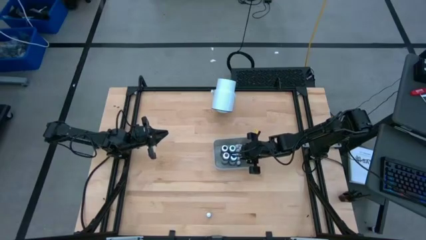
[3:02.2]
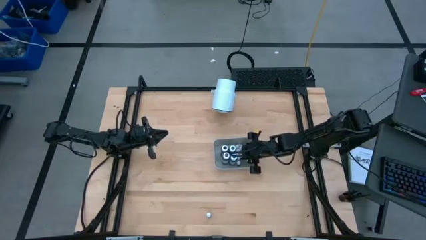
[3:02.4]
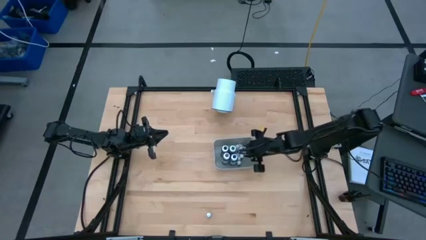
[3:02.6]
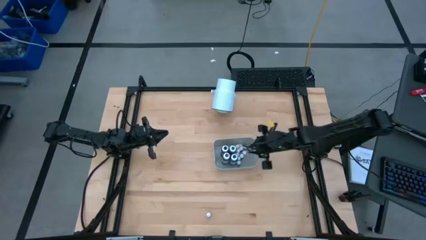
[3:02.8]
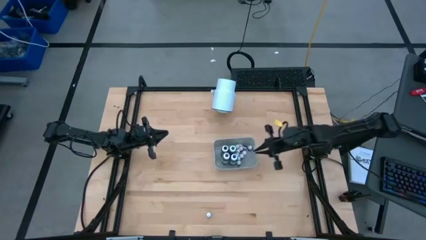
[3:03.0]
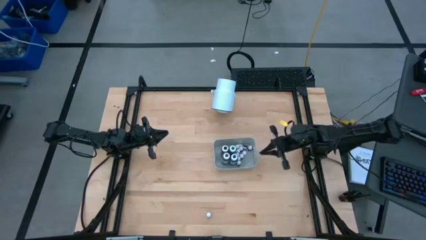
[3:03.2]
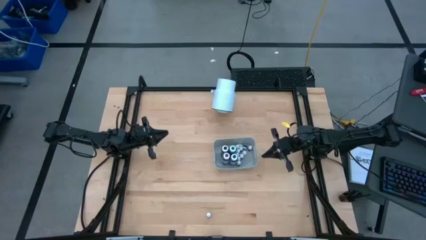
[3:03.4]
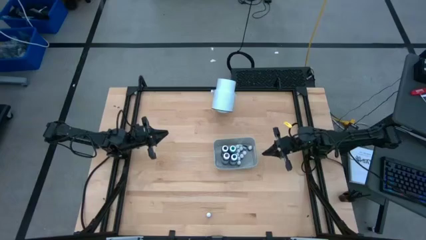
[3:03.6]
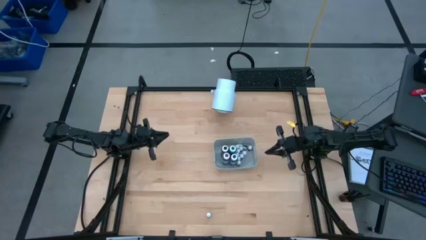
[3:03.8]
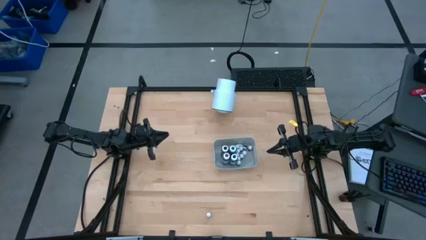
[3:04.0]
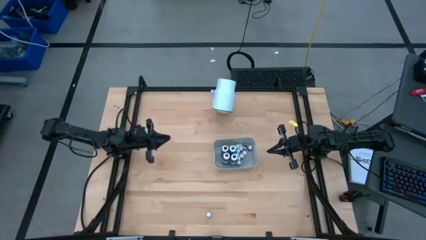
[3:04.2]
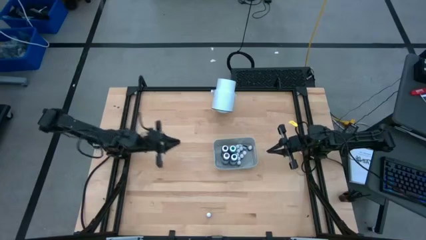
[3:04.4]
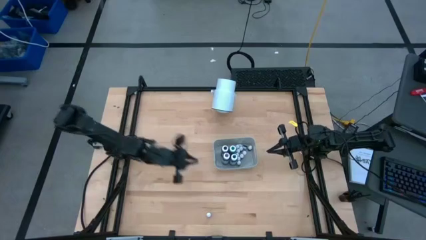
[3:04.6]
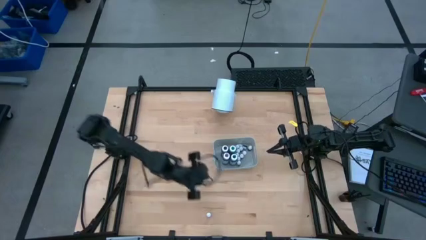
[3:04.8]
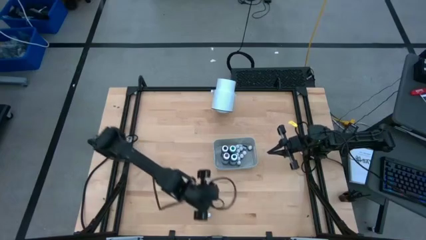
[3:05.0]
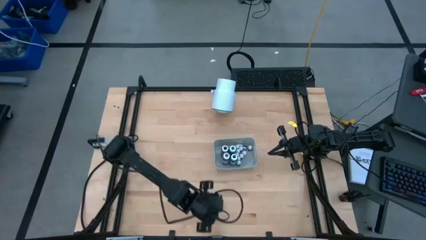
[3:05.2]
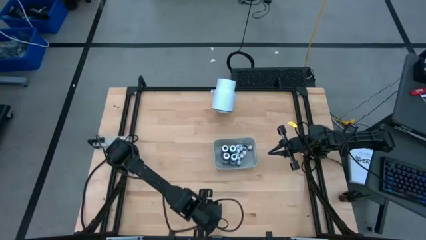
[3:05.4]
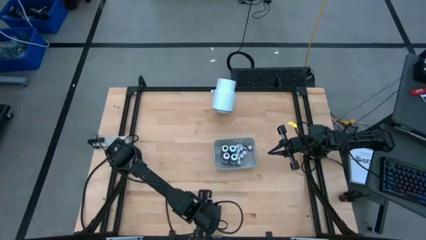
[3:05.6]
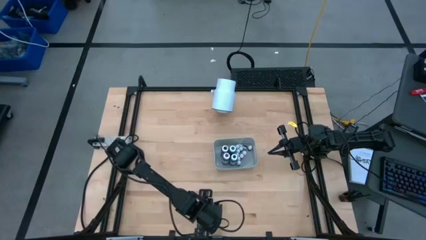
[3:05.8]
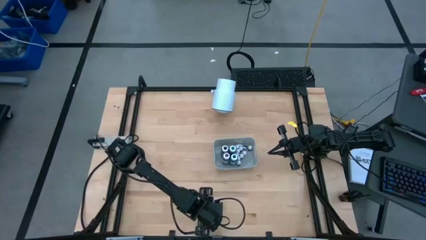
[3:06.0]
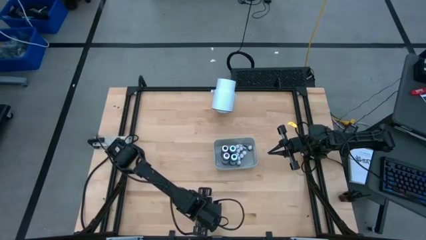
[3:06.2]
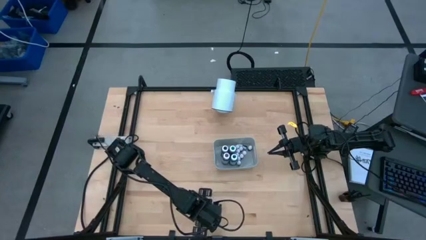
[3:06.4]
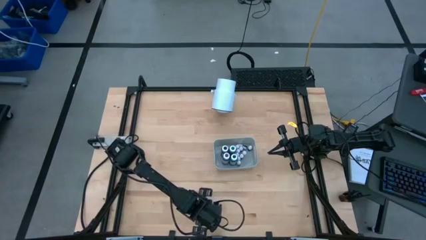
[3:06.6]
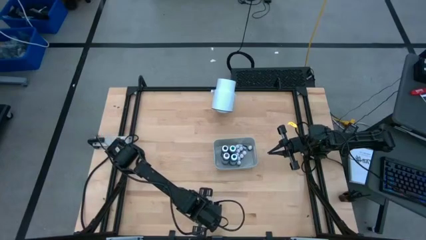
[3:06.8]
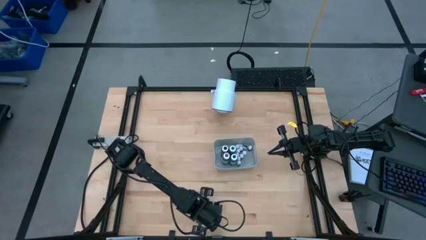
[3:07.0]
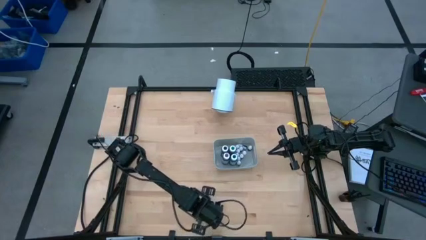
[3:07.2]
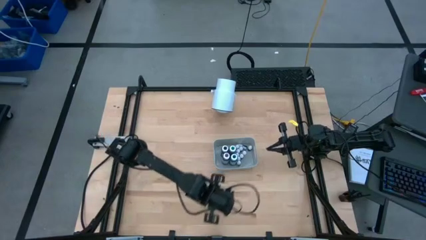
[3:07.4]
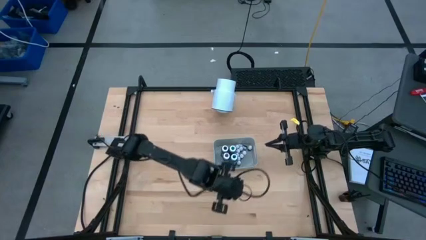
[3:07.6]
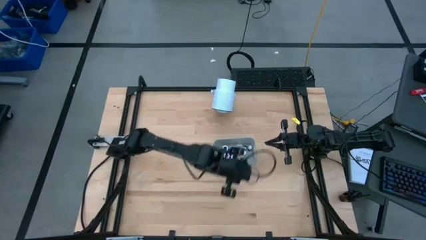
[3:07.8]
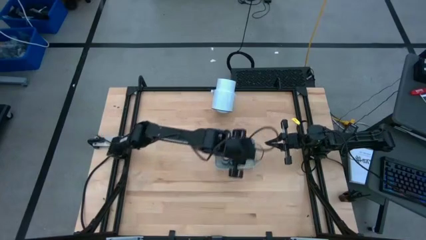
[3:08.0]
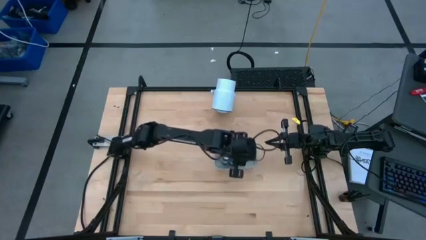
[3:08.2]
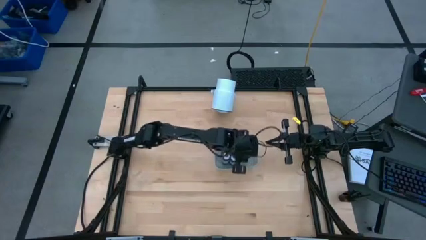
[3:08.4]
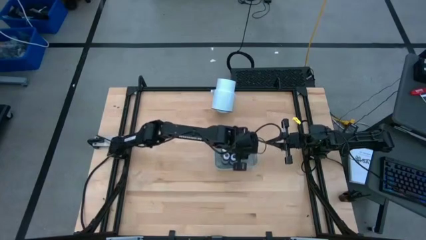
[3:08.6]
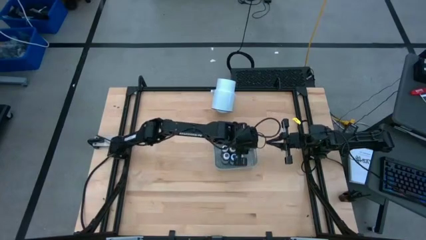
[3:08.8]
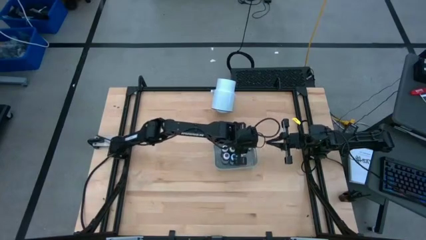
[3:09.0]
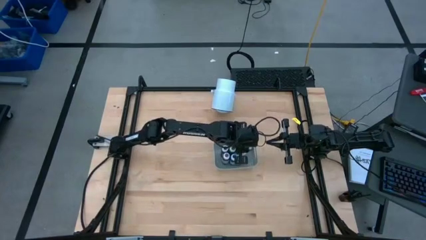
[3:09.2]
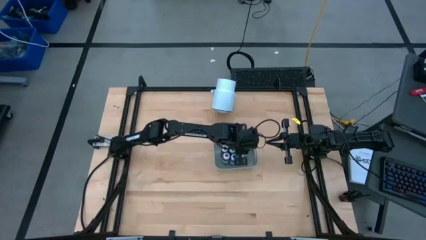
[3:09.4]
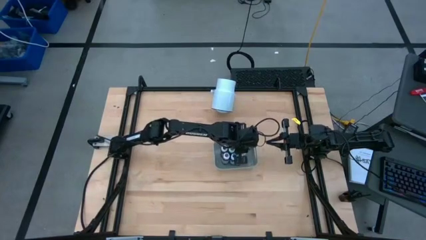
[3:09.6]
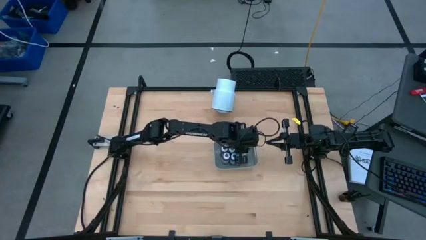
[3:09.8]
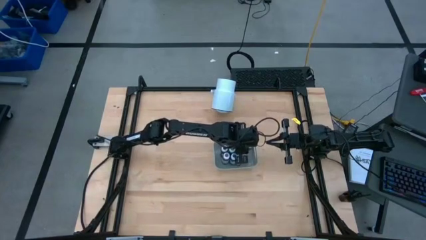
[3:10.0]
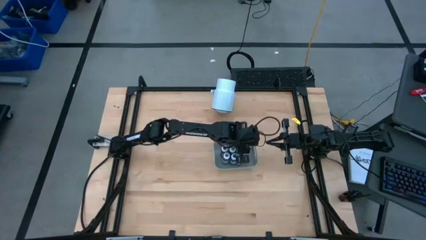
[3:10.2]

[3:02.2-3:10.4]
Task: Pick & Place food coloring
Put the small violet food coloring bottle into the gray bin

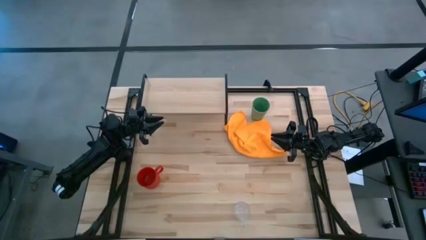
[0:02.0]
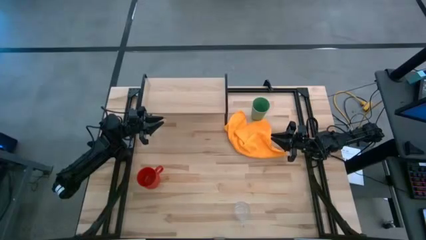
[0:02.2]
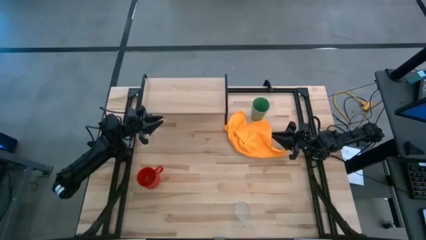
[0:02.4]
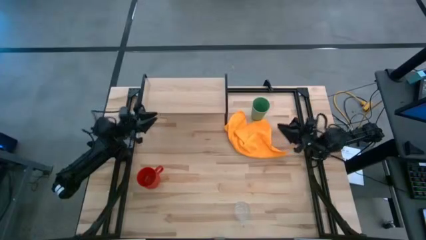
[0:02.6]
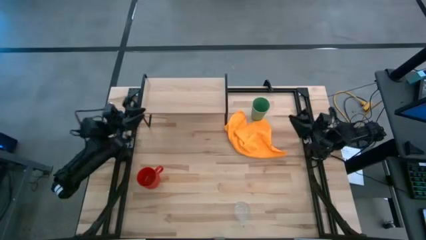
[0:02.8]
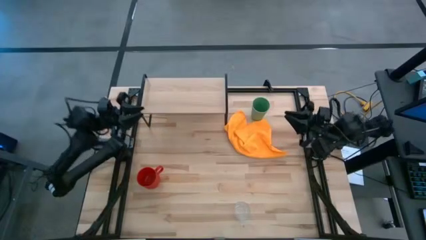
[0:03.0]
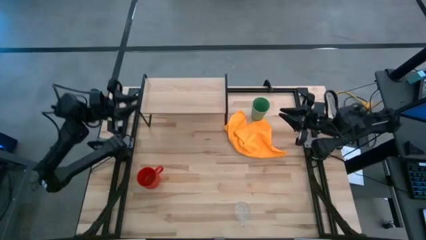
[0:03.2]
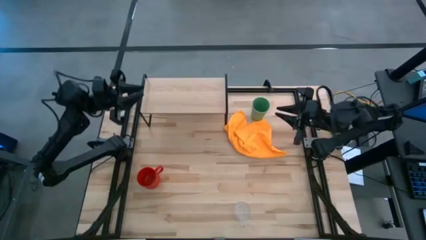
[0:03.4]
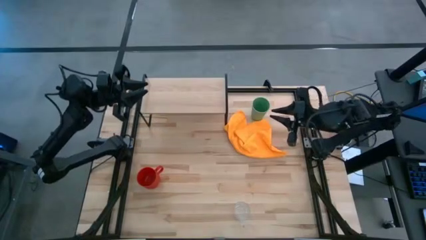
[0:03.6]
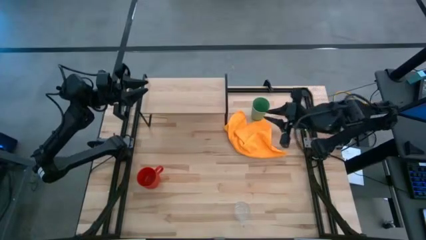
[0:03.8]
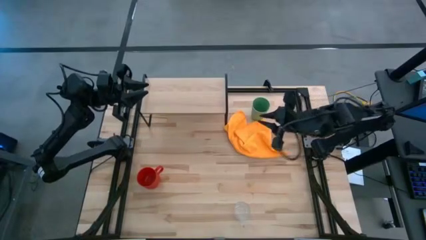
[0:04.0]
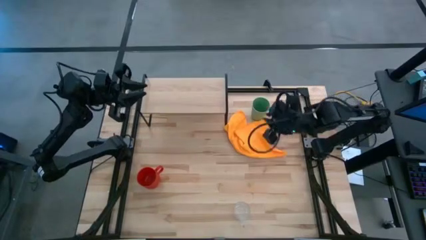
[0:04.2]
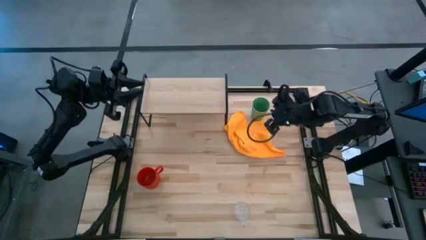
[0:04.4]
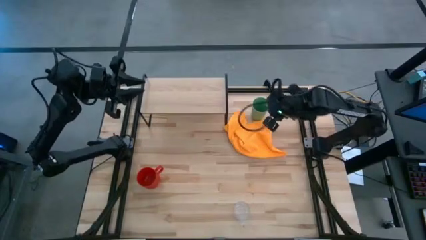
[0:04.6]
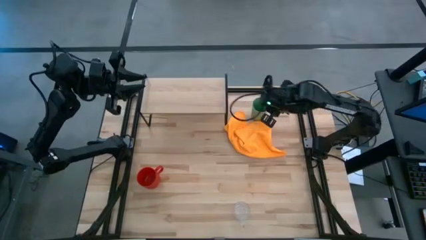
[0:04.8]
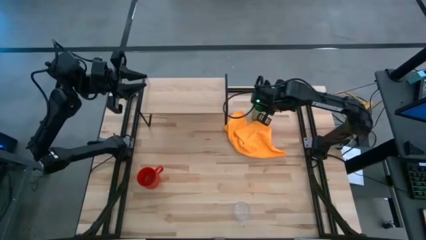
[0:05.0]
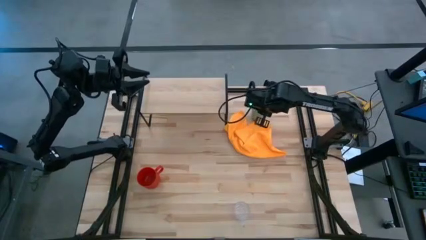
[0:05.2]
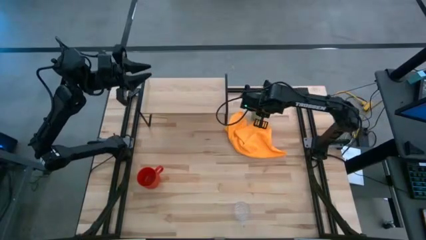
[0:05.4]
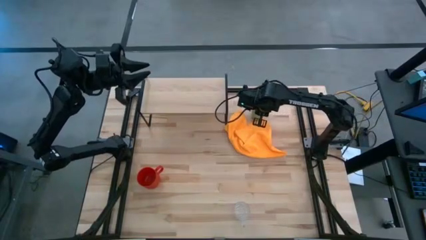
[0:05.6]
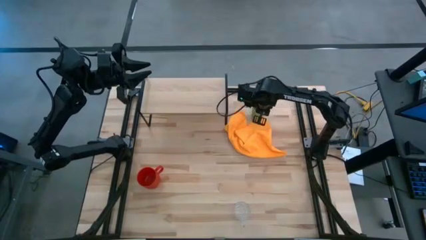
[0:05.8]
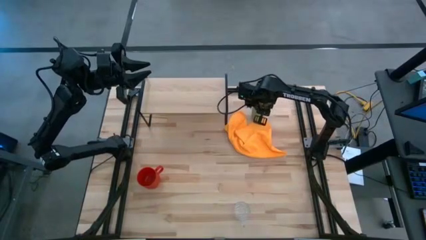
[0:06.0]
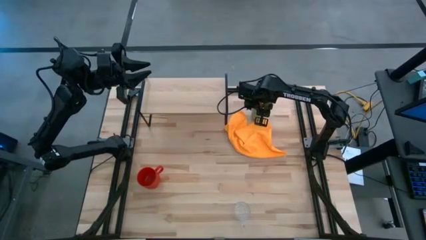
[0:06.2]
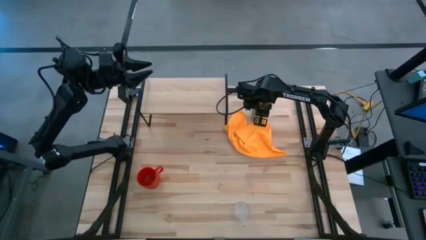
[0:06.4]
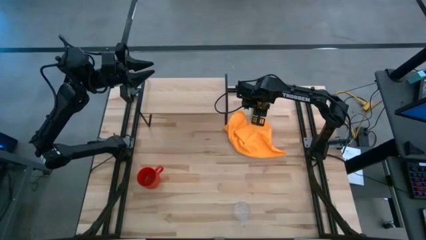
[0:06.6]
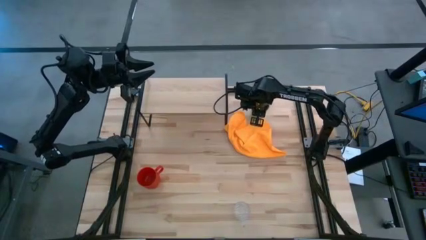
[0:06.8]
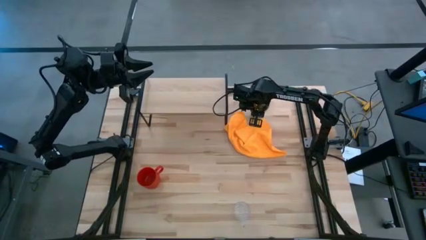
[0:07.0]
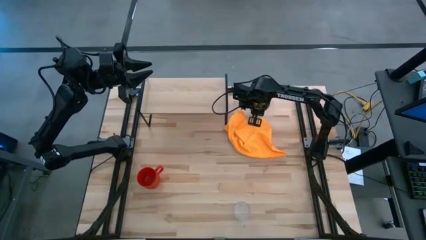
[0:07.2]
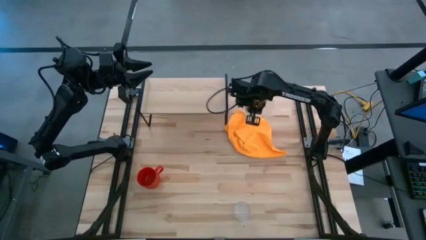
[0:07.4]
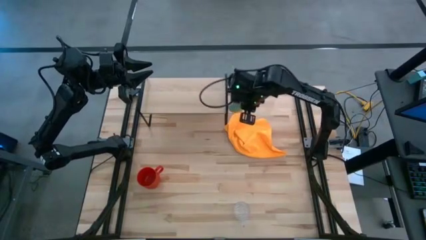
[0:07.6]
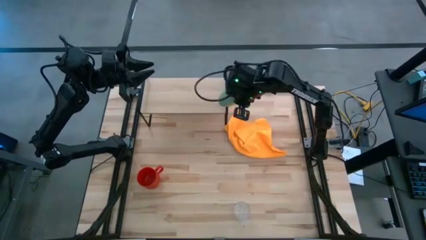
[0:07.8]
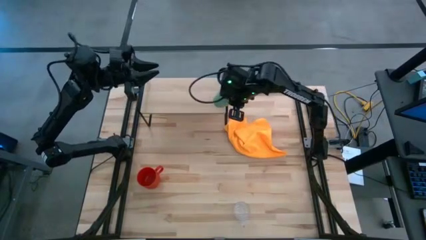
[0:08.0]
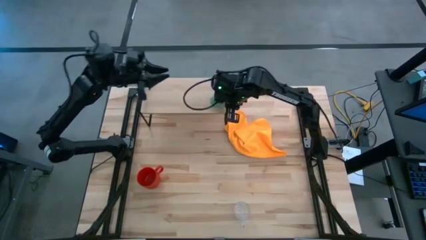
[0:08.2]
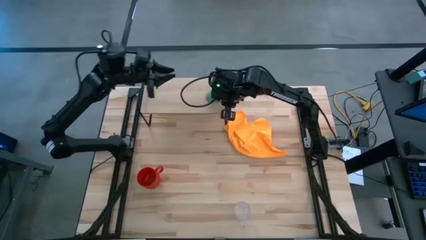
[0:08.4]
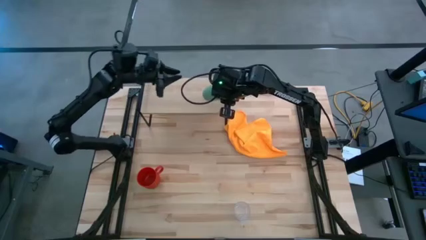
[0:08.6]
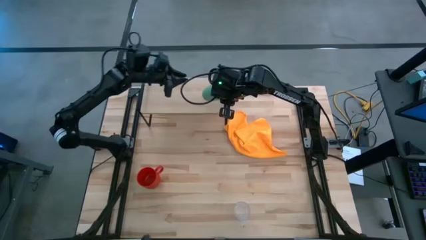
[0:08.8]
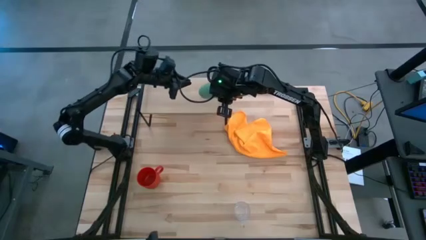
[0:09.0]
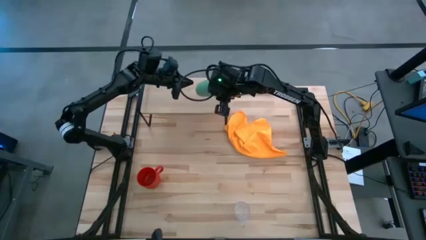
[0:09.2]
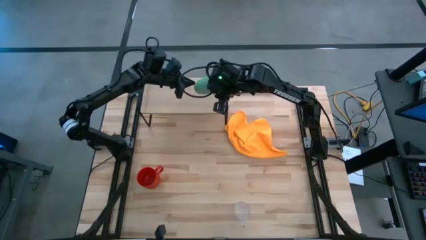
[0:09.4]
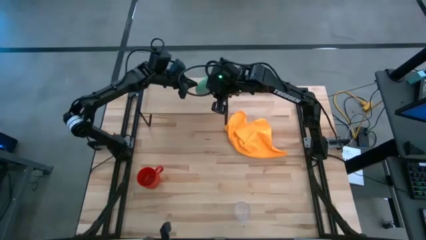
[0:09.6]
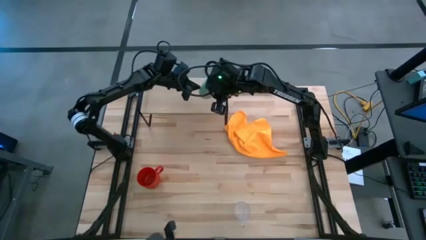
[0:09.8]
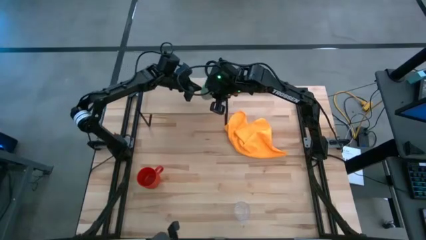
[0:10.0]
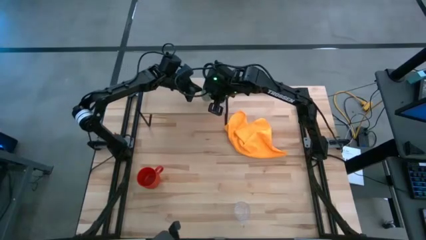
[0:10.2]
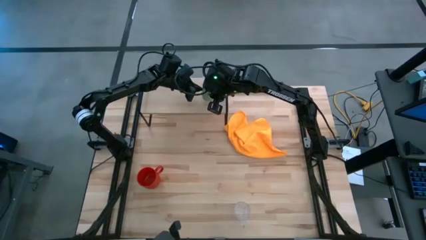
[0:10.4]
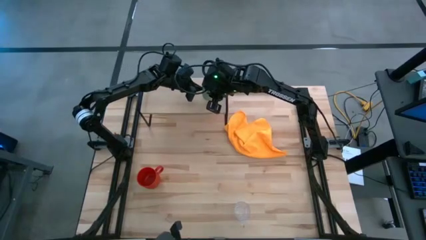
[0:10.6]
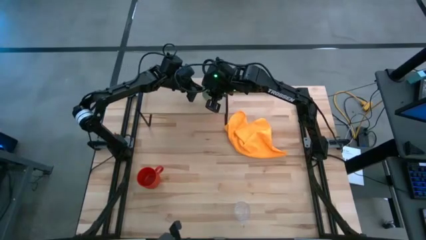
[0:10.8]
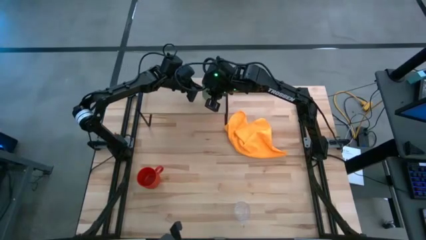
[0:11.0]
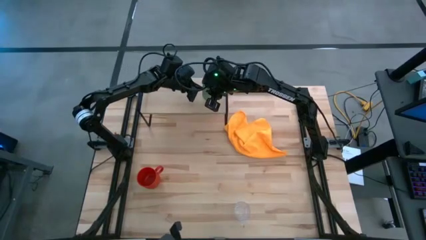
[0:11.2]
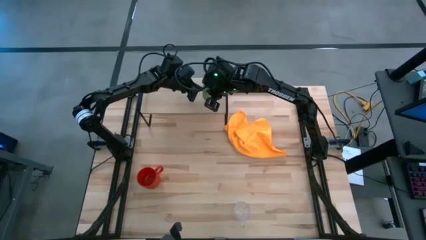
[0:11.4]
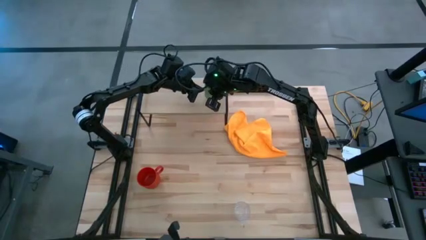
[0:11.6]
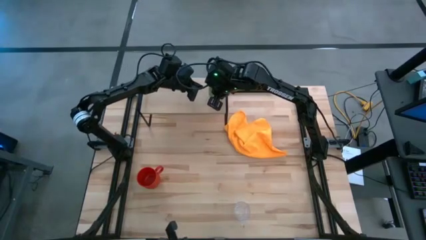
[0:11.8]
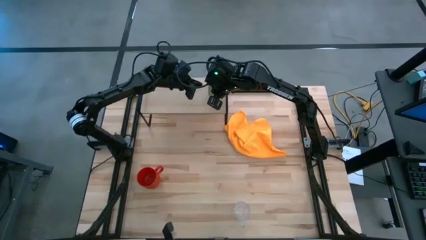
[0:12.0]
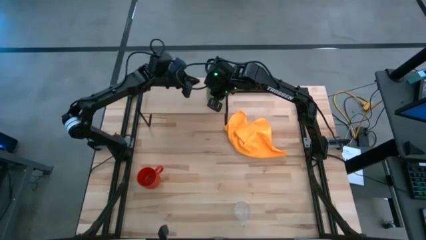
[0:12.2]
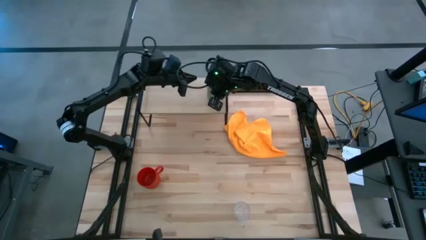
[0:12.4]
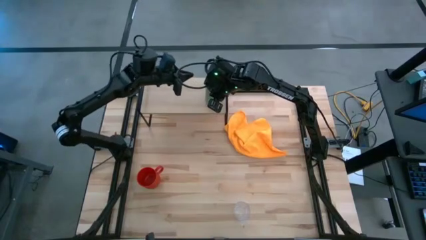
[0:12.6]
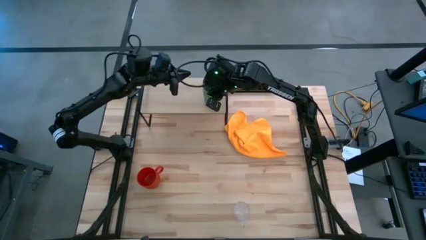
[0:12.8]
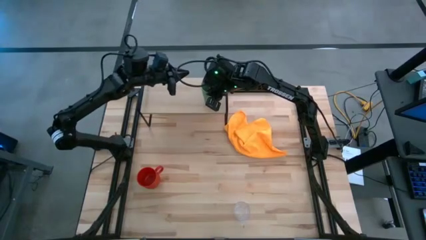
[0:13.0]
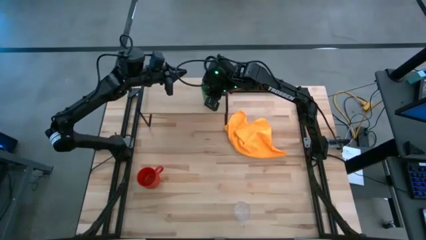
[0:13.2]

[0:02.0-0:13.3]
Task: Stack small to large cups/mugs on shelf
Put the green cup on the shelf
